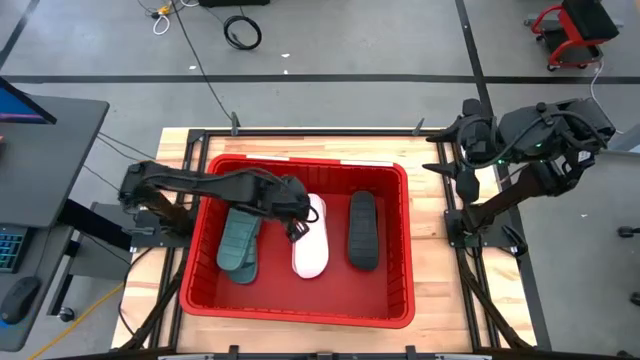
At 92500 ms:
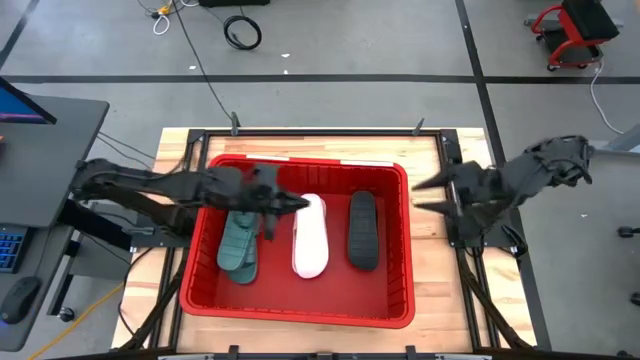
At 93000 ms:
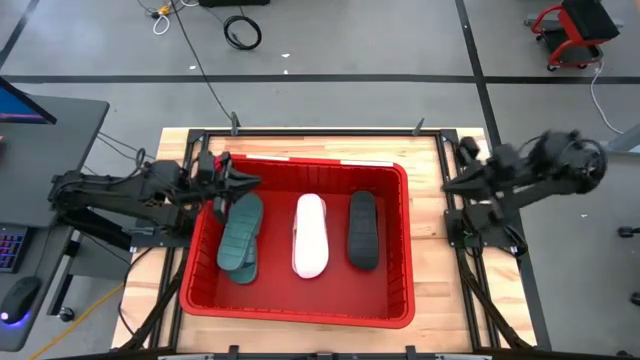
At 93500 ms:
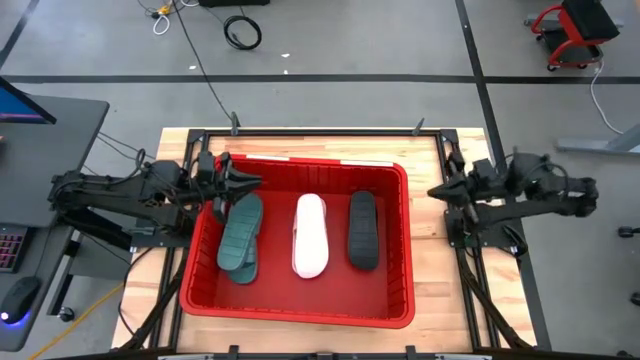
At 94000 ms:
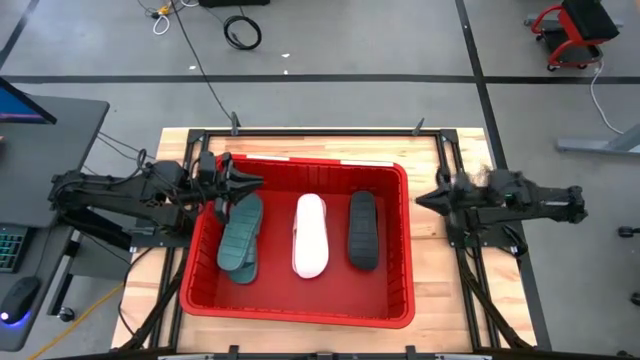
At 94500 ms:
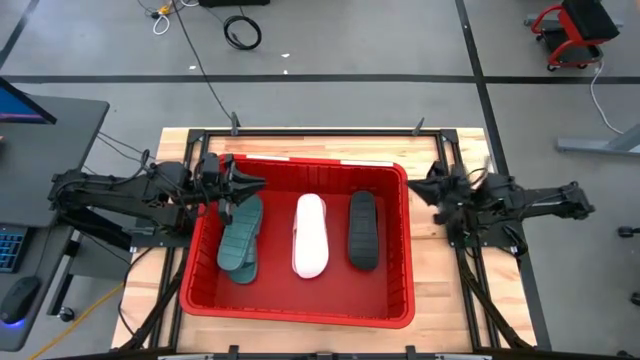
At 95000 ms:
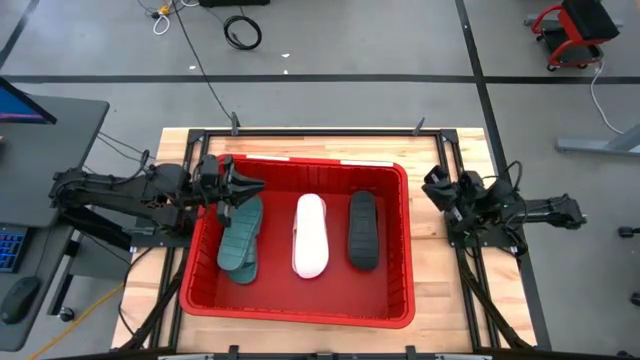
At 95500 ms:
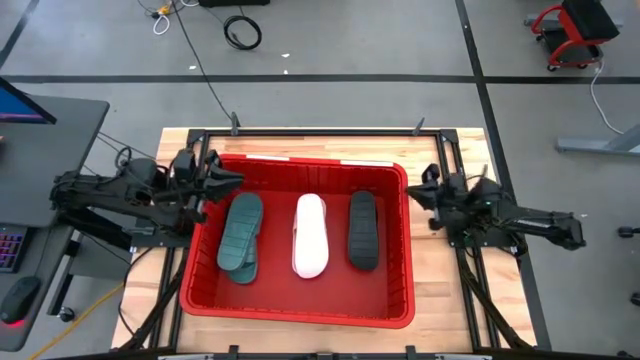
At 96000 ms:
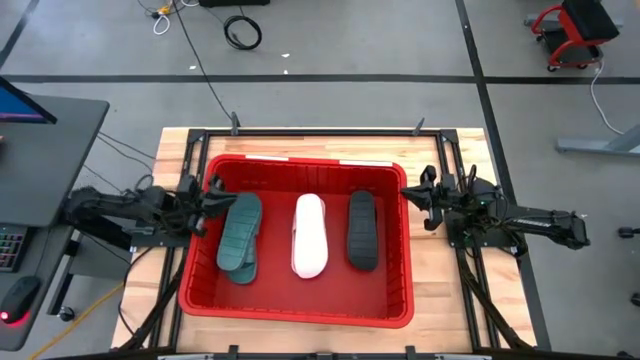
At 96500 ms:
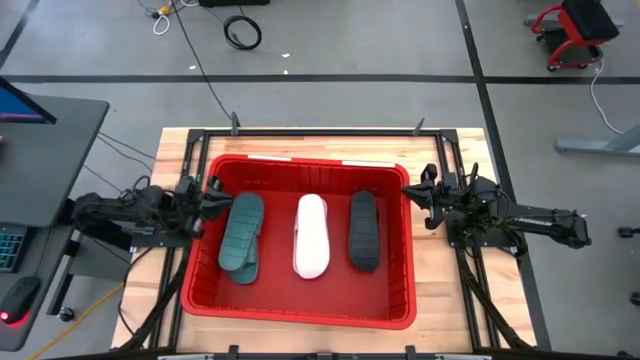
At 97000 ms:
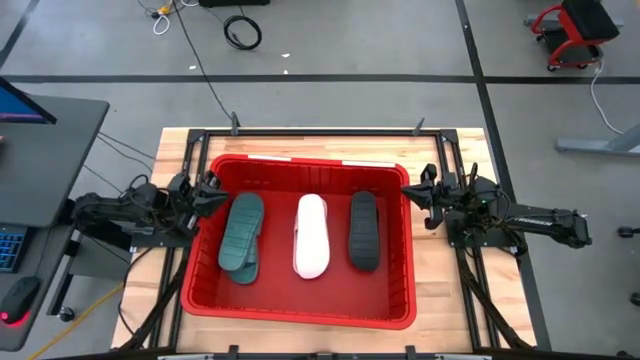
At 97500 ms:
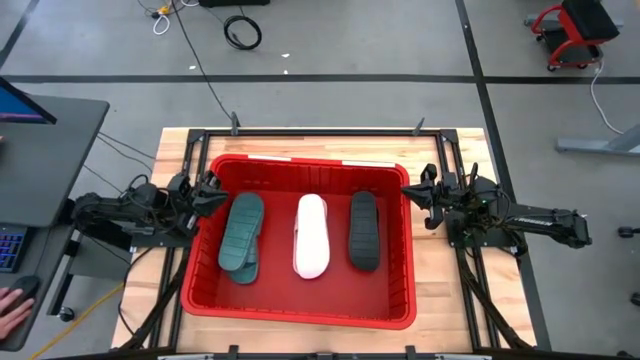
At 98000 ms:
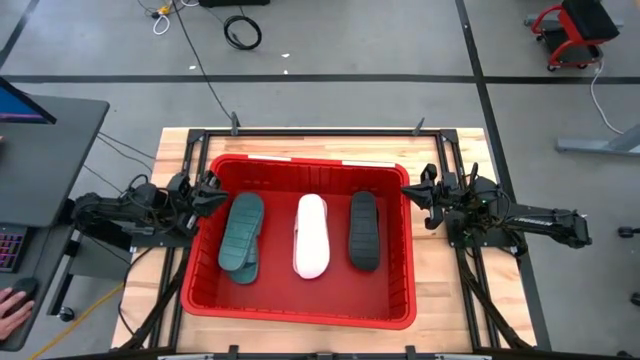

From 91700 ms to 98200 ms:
Task: Pick and place slides into bin
Return to Home Position

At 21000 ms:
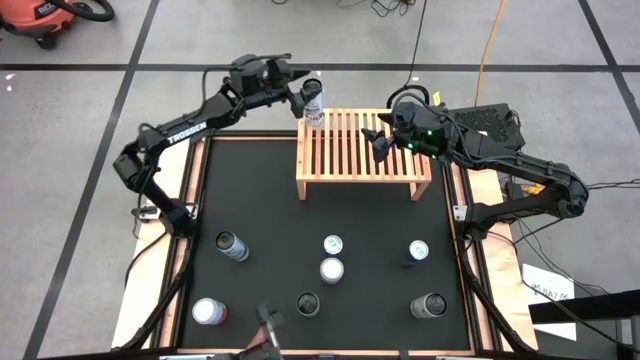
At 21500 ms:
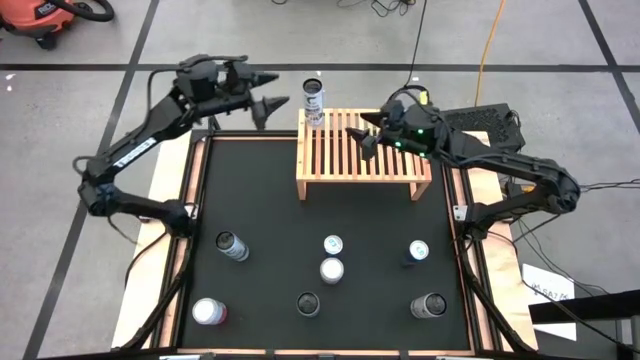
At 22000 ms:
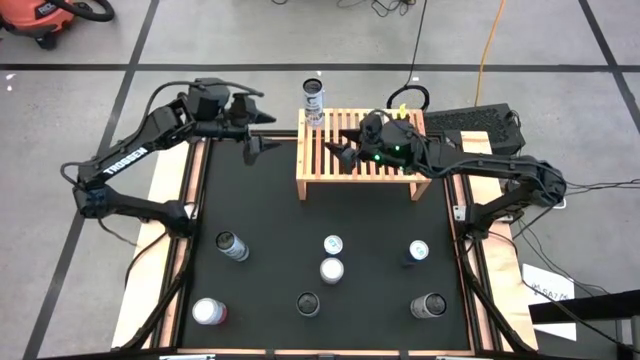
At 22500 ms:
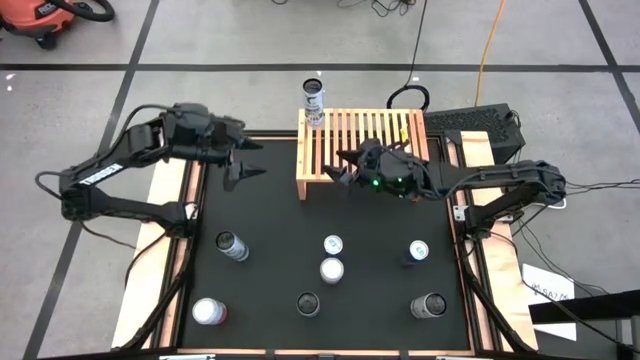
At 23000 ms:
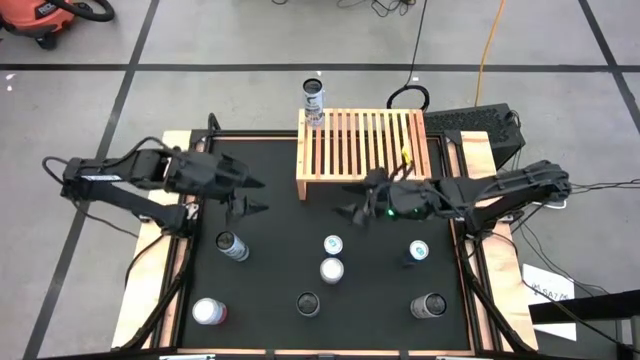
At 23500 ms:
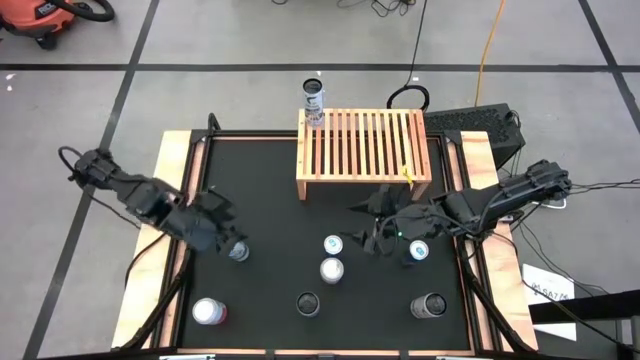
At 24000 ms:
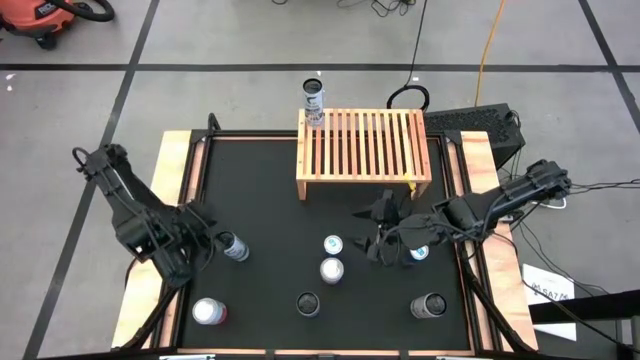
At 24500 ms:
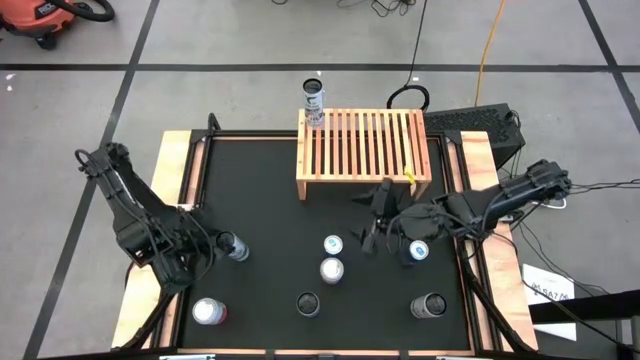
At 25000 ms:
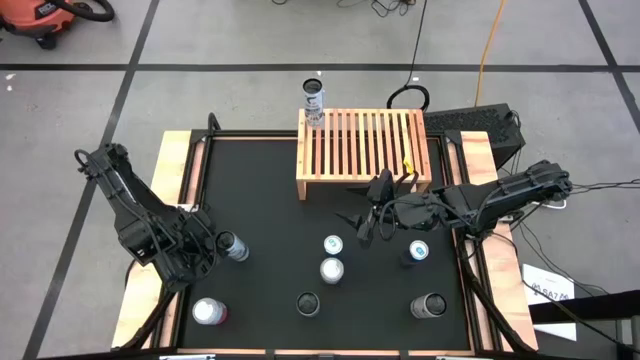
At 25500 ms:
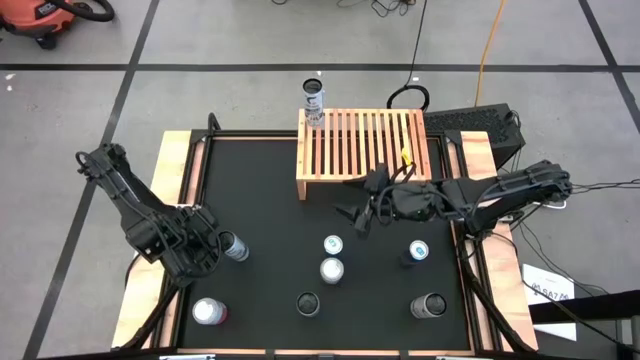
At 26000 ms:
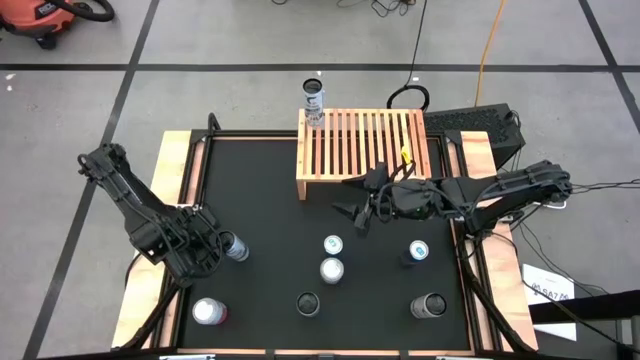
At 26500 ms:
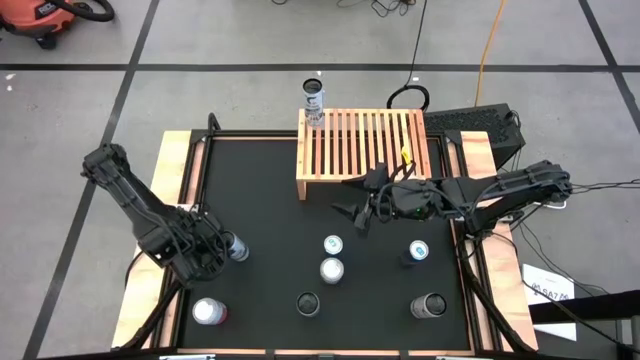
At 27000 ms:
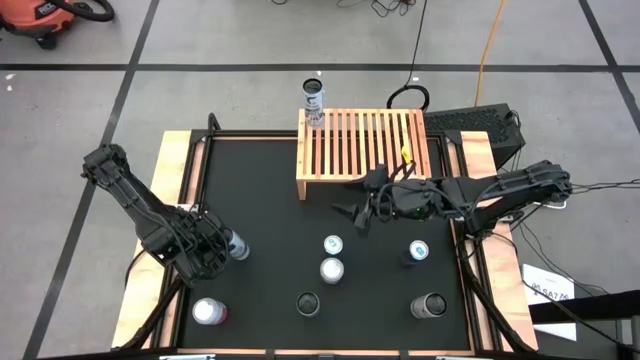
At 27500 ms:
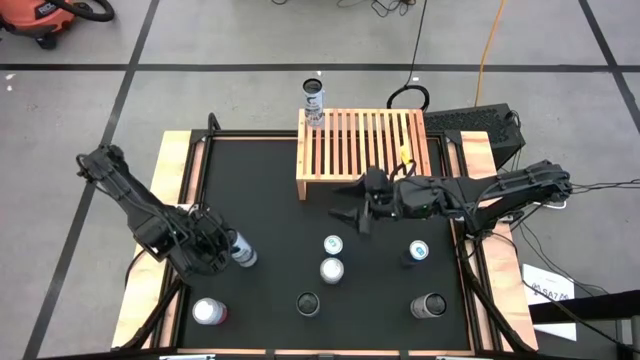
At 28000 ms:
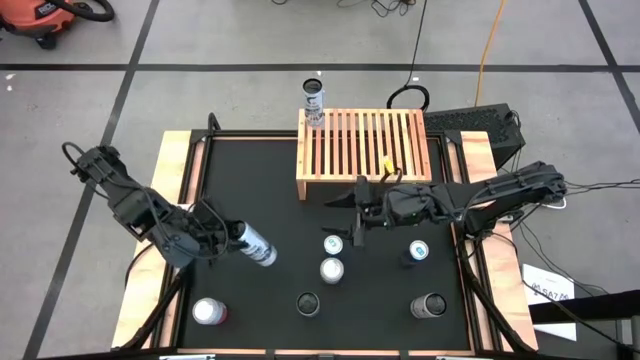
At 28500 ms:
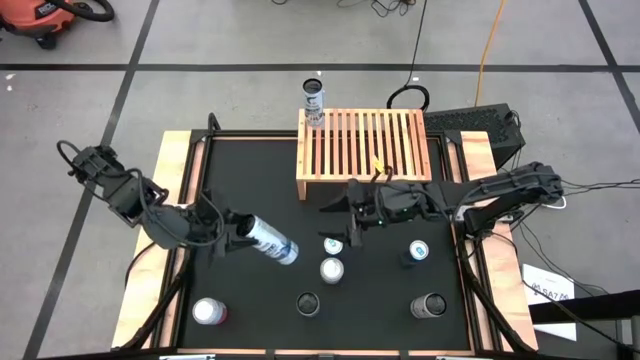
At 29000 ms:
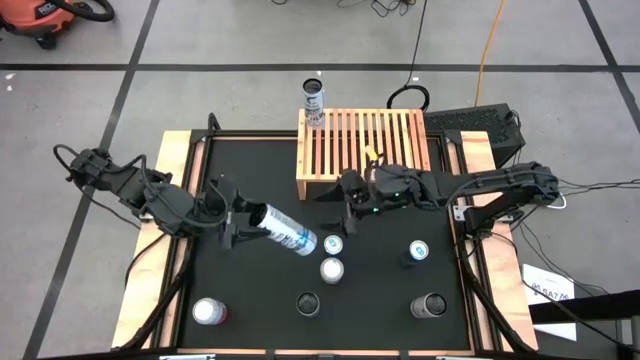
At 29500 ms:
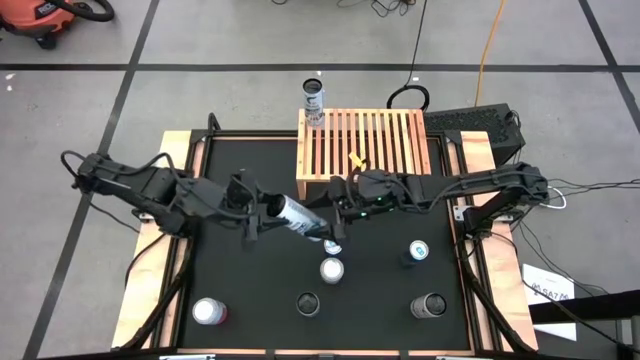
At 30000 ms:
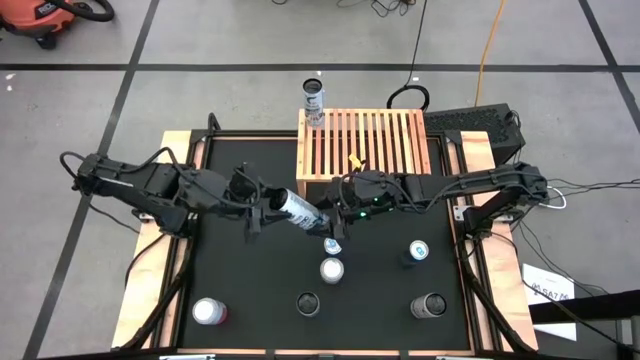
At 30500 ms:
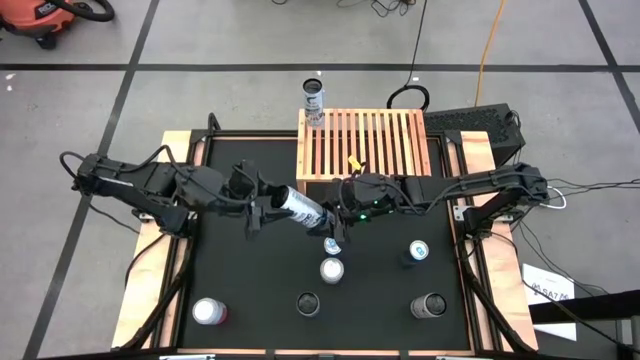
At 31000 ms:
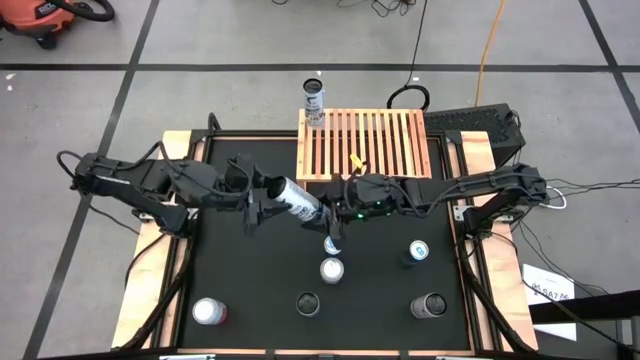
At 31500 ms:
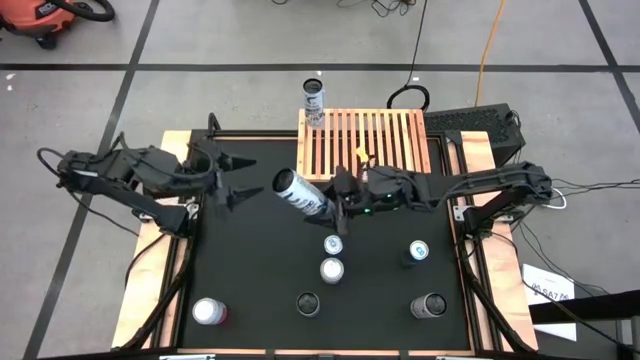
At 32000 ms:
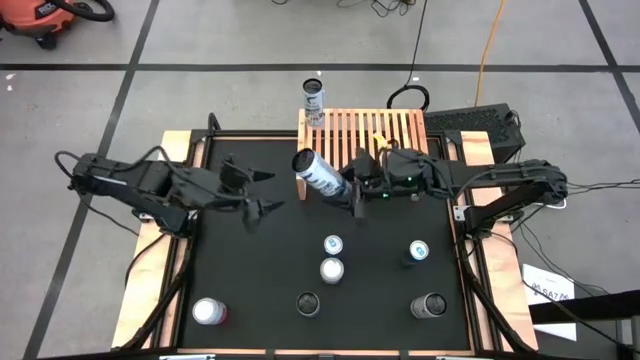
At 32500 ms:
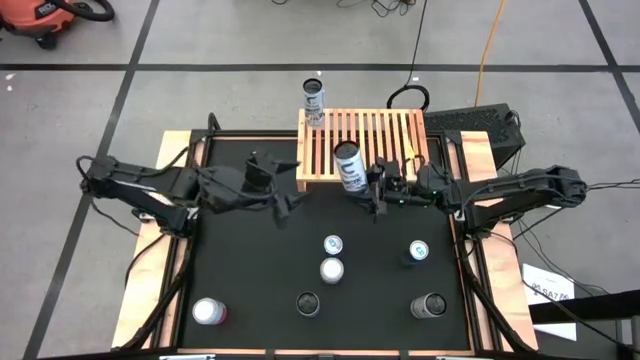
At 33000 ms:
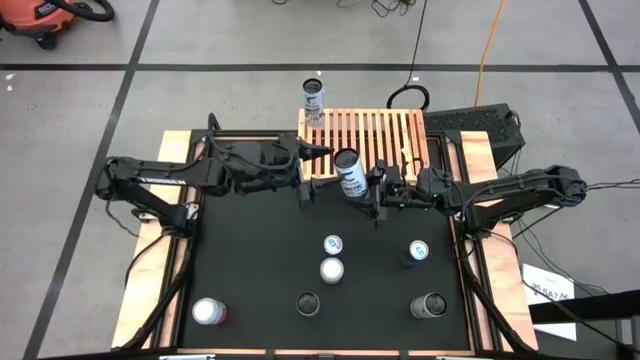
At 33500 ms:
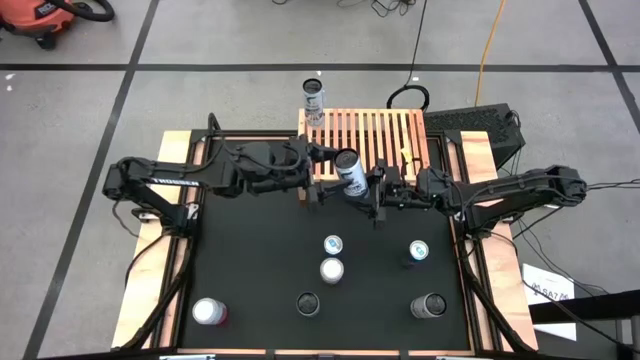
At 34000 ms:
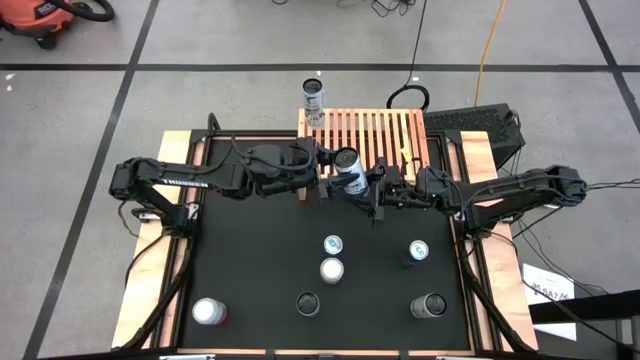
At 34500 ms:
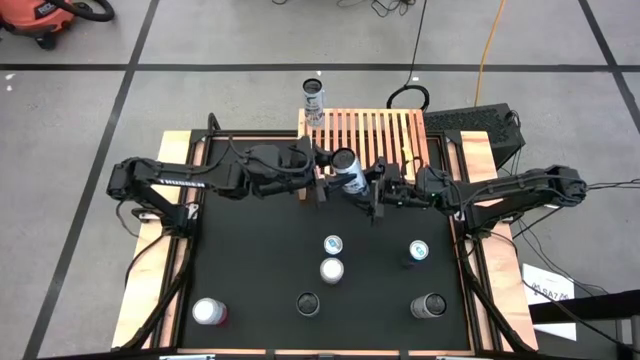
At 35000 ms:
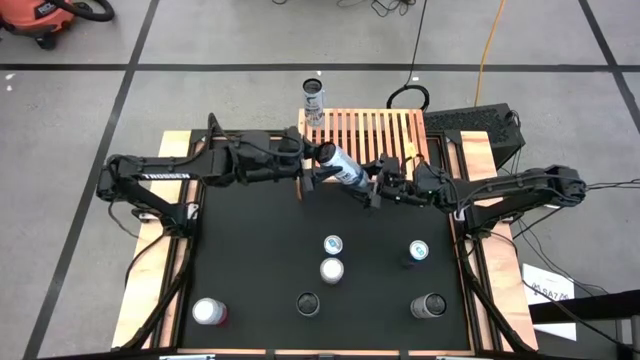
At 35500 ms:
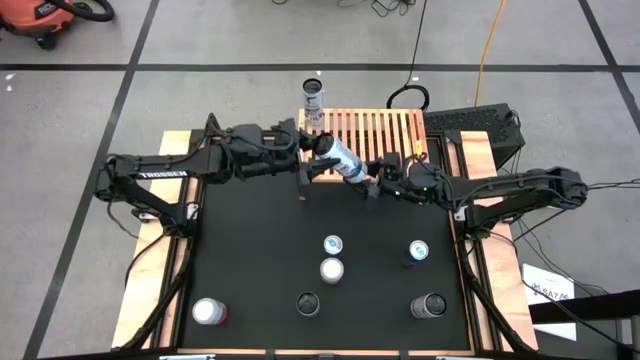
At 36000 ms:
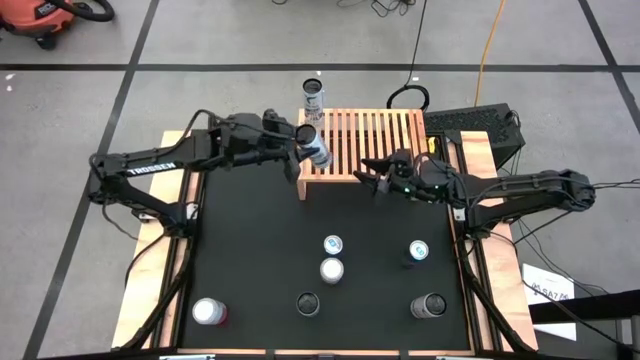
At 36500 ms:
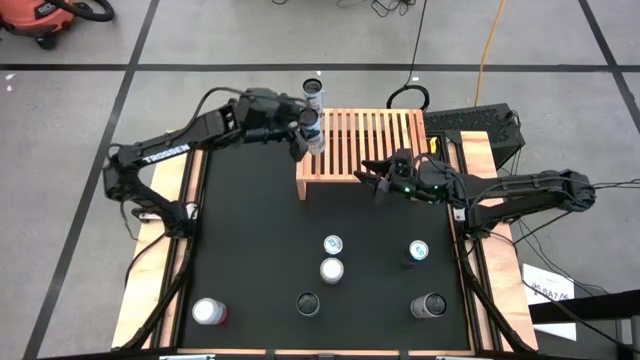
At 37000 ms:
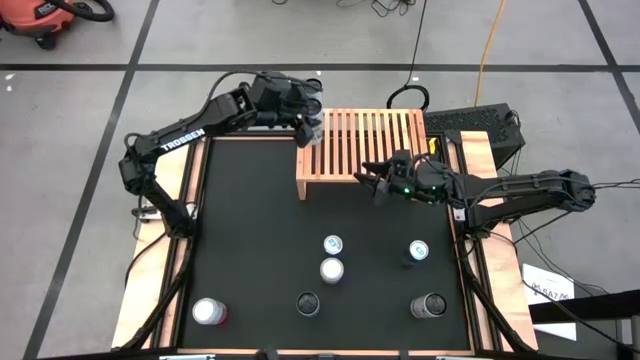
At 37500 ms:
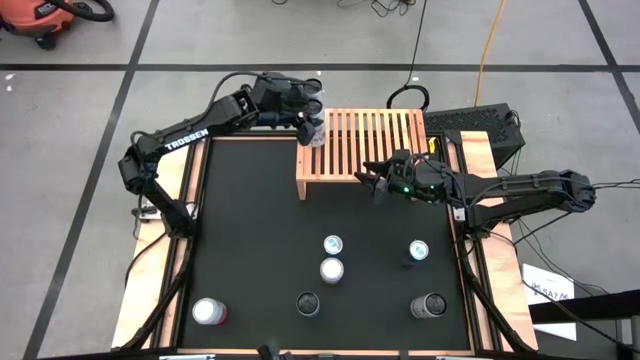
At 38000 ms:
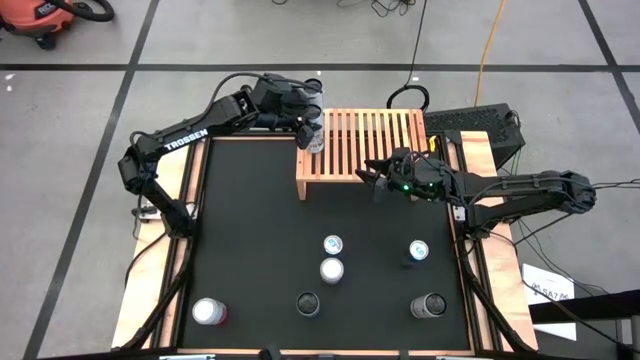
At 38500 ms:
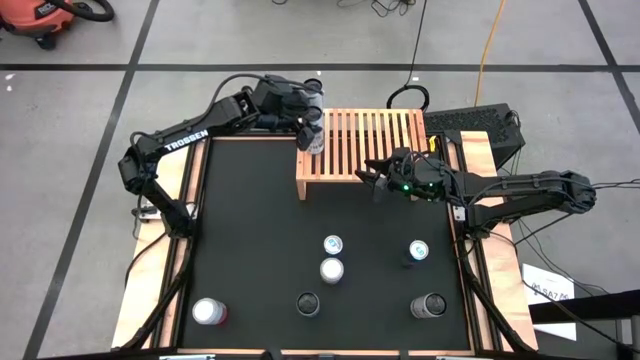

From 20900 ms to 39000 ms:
Task: Place canned beverage on shelf
Put the blue soda can on the shelf aligned with the other blue soda can
